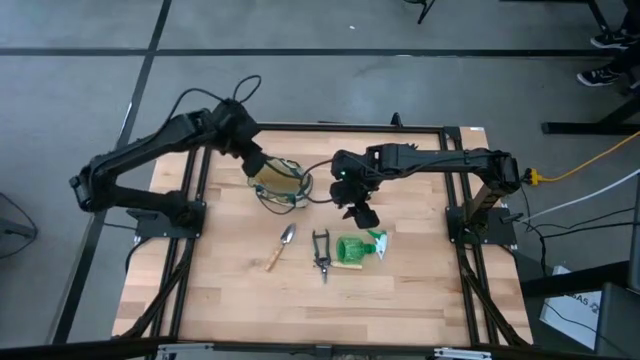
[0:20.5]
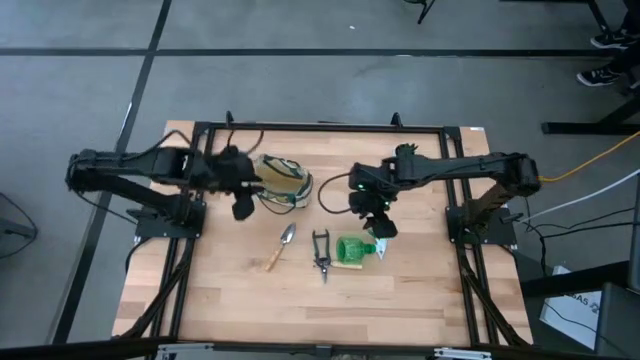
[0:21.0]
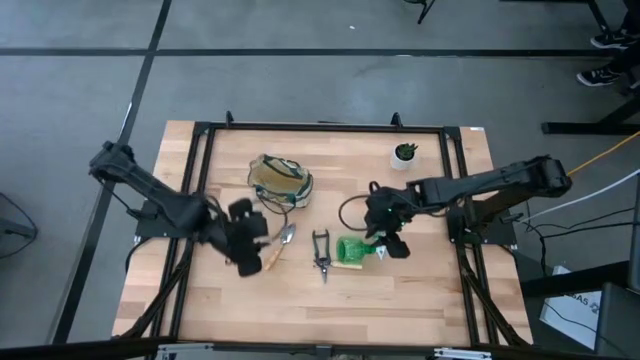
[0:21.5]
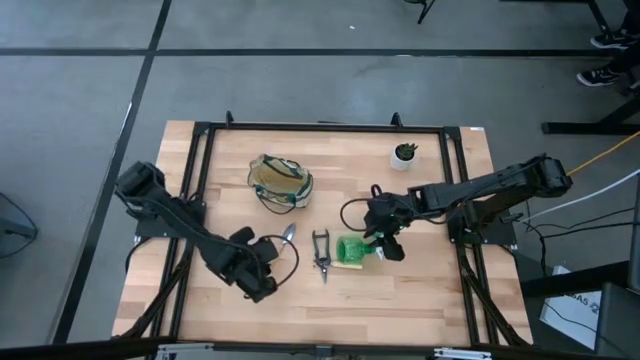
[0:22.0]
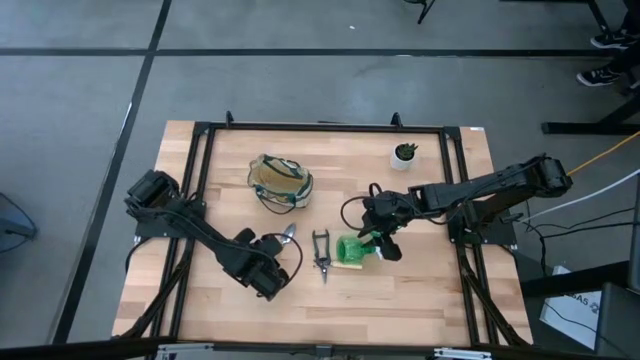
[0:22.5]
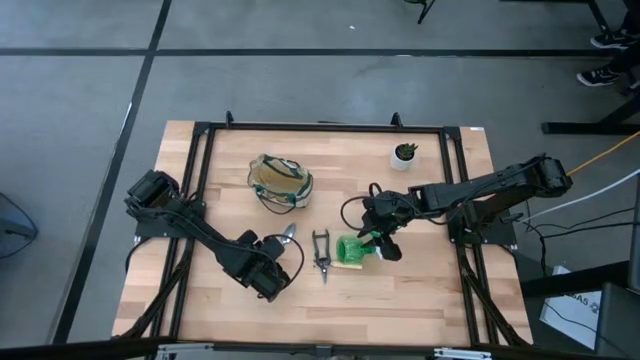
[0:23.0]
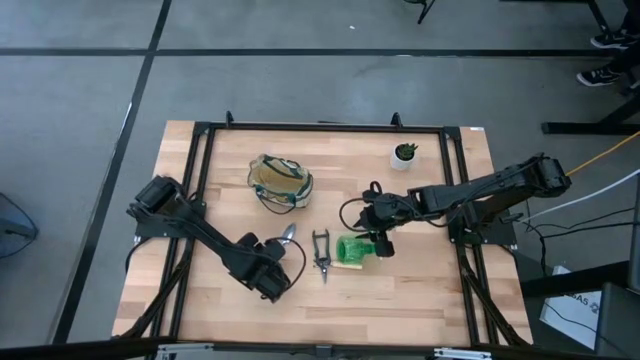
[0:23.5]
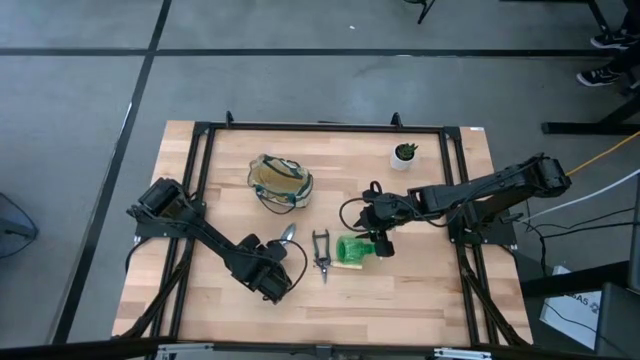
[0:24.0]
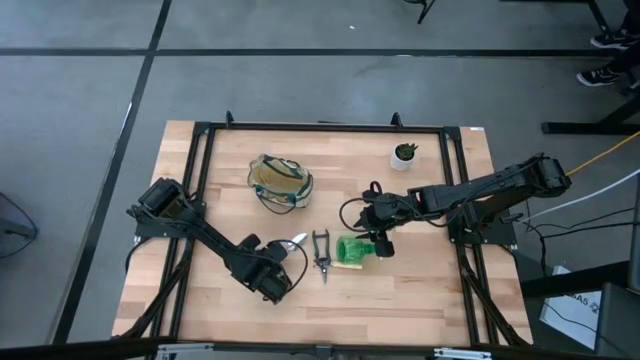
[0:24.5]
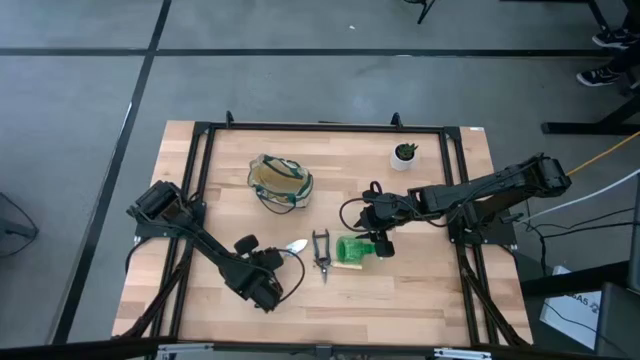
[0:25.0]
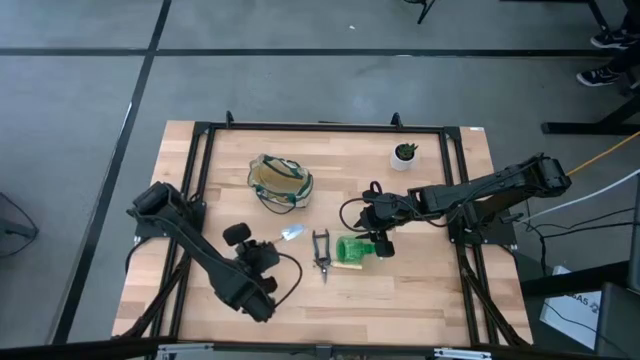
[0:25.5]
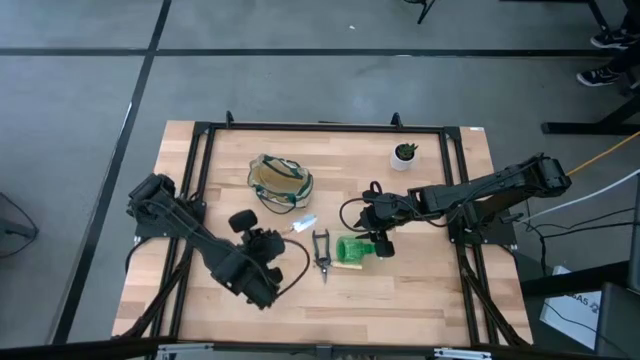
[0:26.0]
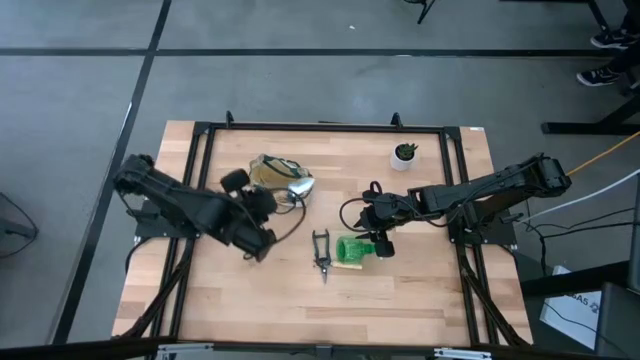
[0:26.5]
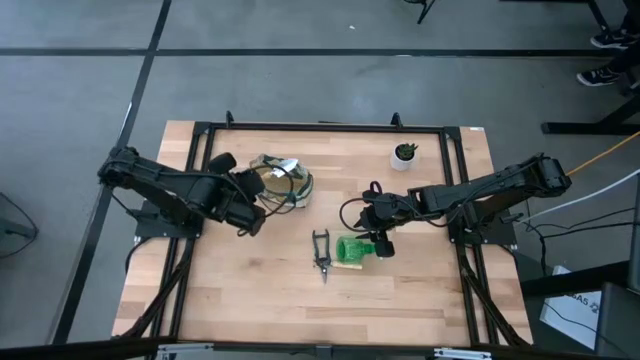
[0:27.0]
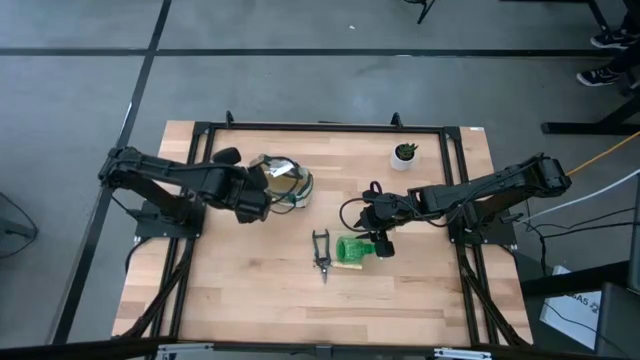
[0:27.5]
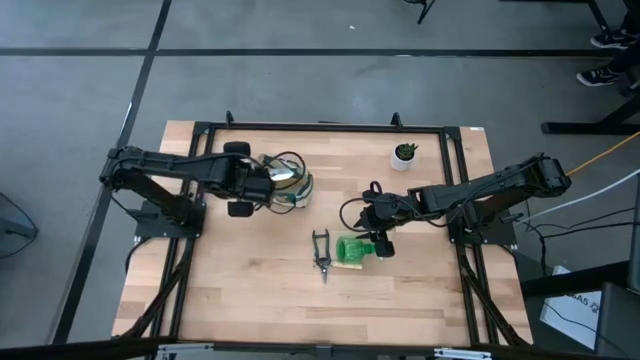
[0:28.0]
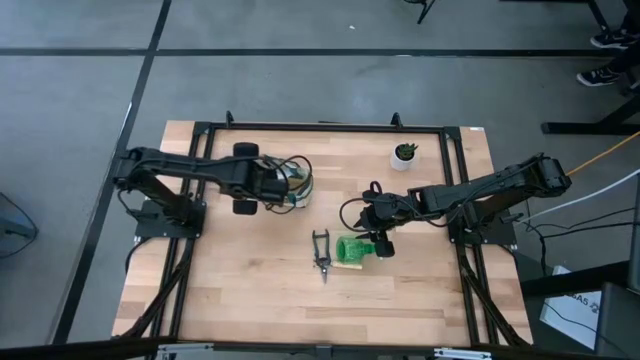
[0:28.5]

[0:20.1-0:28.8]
Task: Pick & Place Garden tools in Gardening bag
Put the trowel into the gardening bag

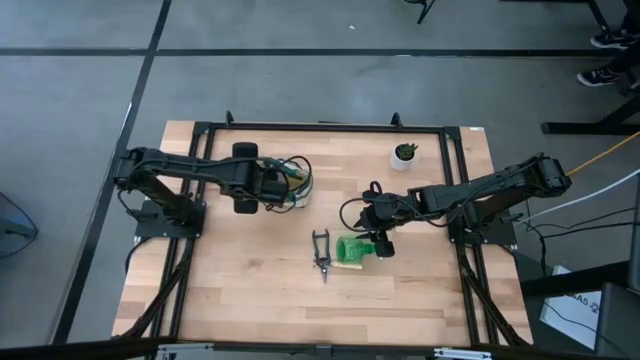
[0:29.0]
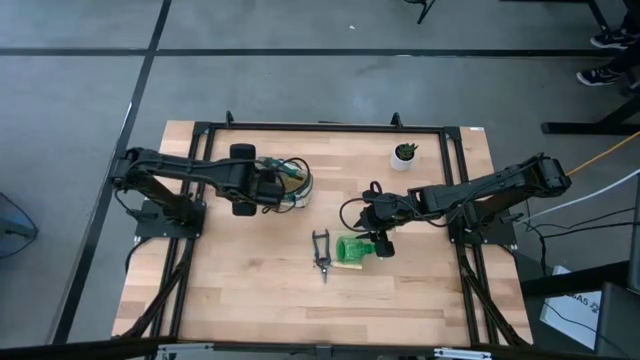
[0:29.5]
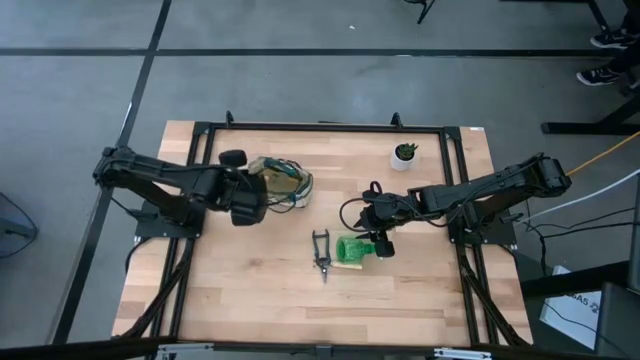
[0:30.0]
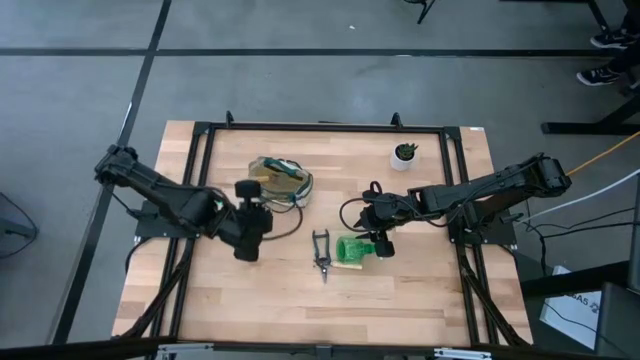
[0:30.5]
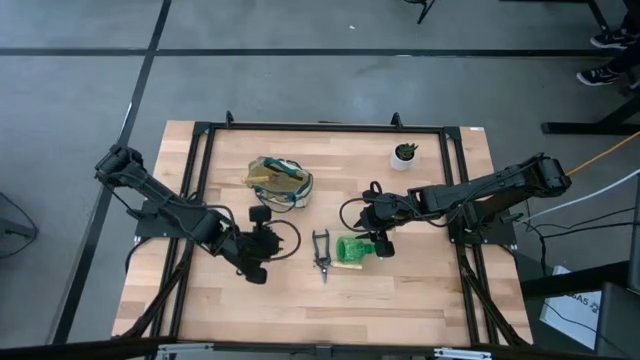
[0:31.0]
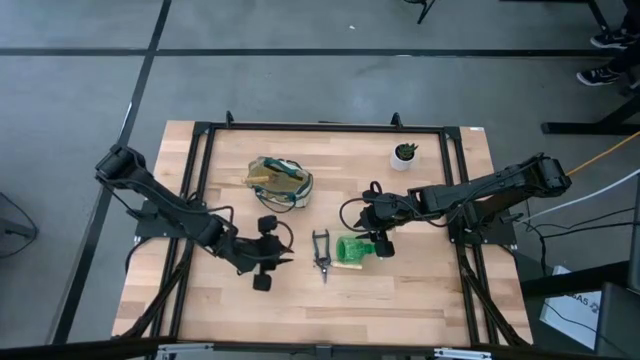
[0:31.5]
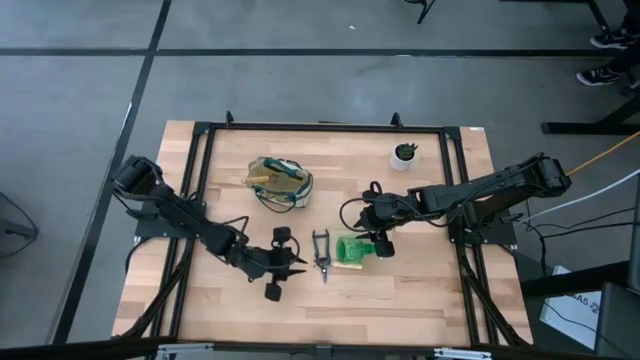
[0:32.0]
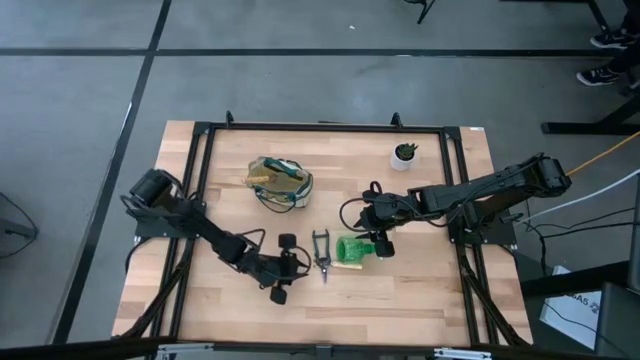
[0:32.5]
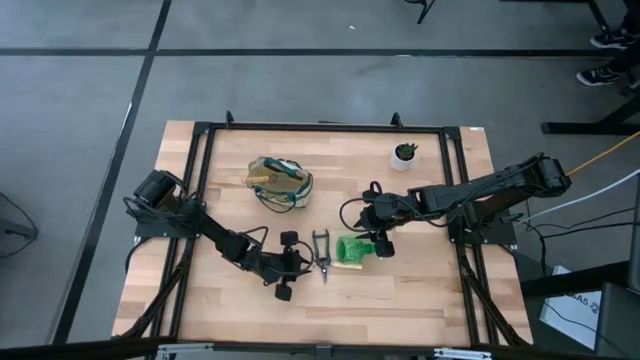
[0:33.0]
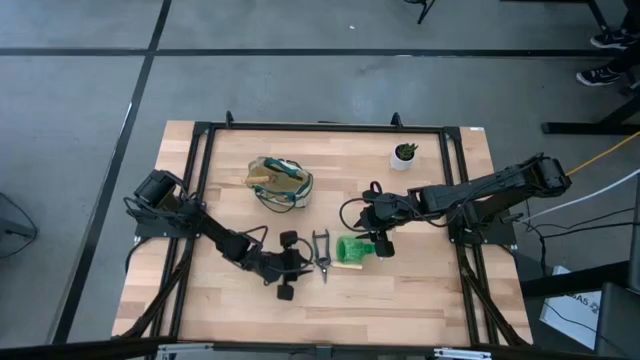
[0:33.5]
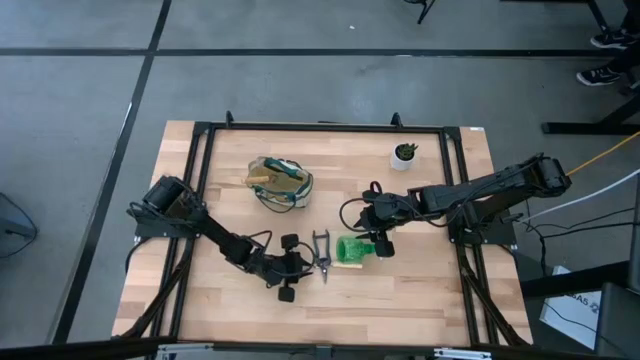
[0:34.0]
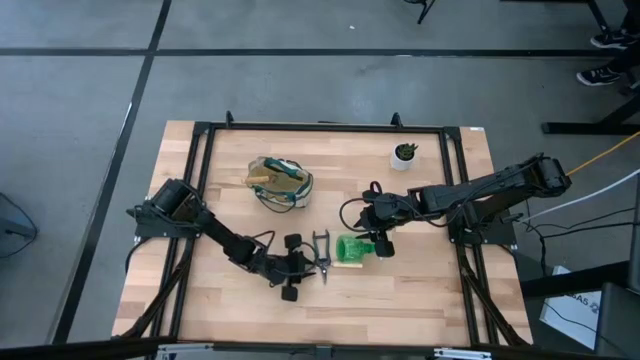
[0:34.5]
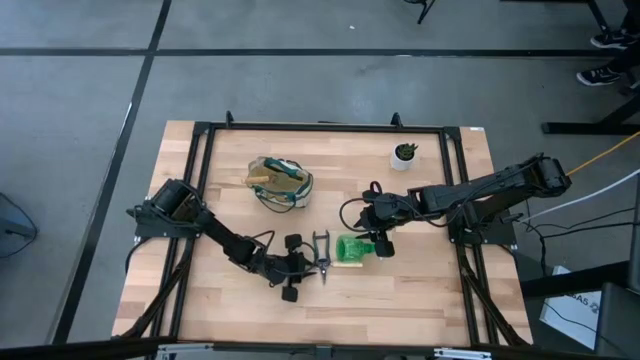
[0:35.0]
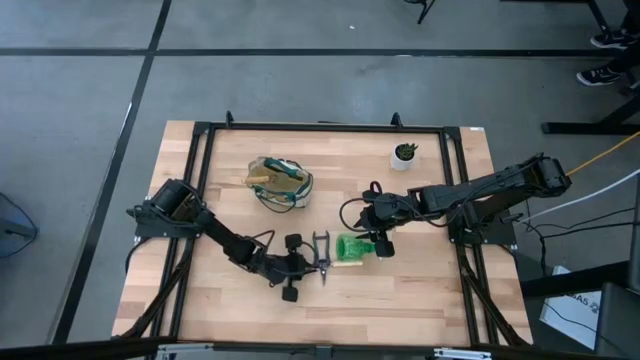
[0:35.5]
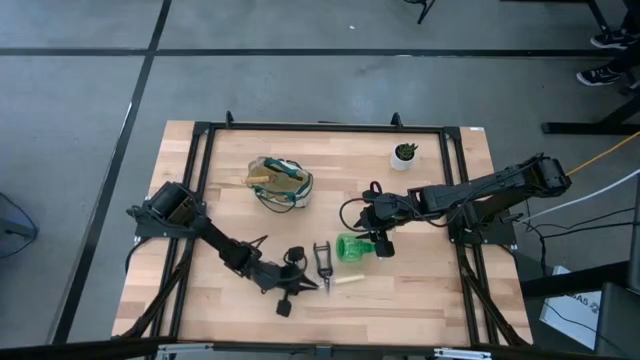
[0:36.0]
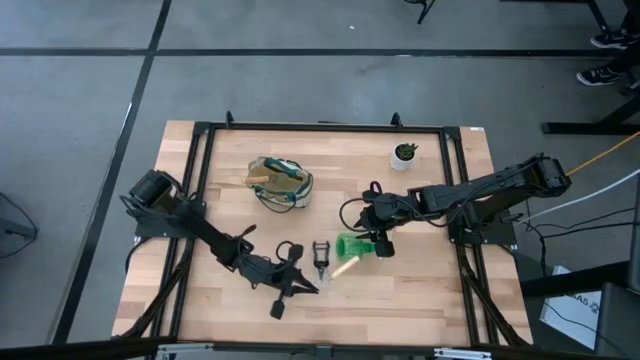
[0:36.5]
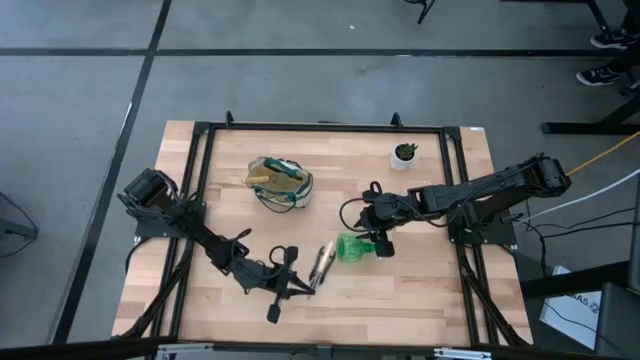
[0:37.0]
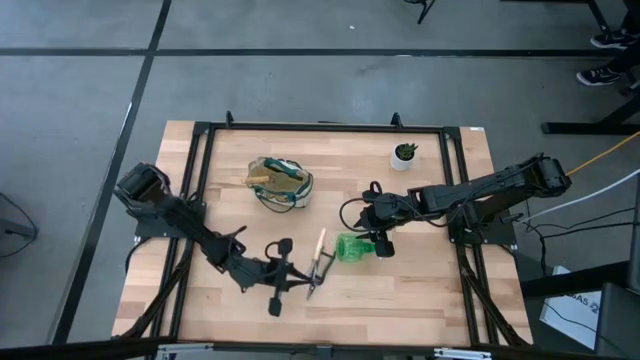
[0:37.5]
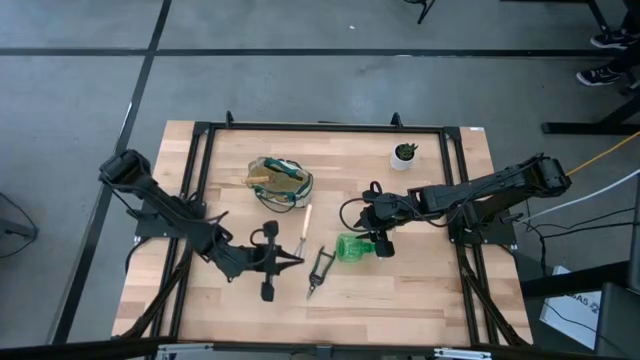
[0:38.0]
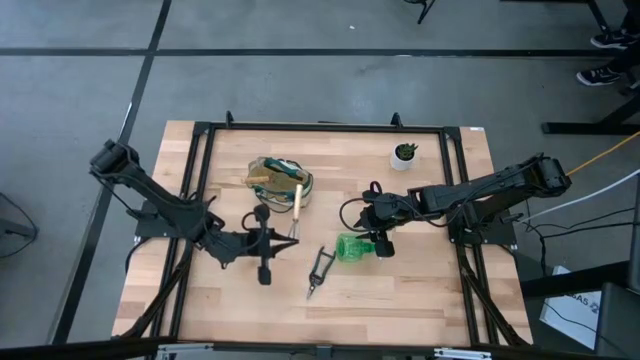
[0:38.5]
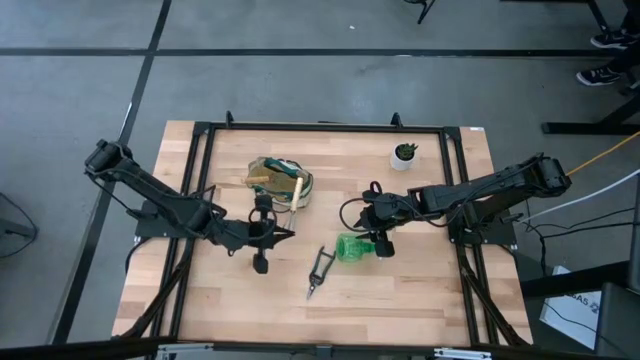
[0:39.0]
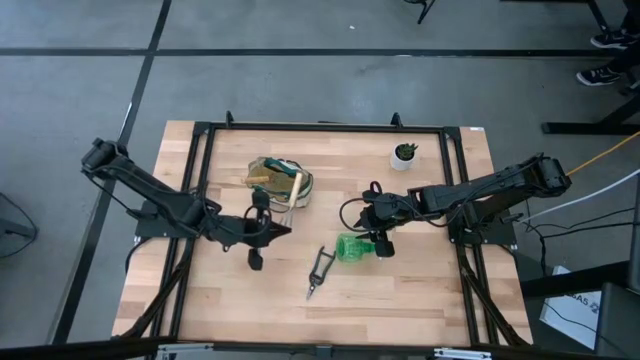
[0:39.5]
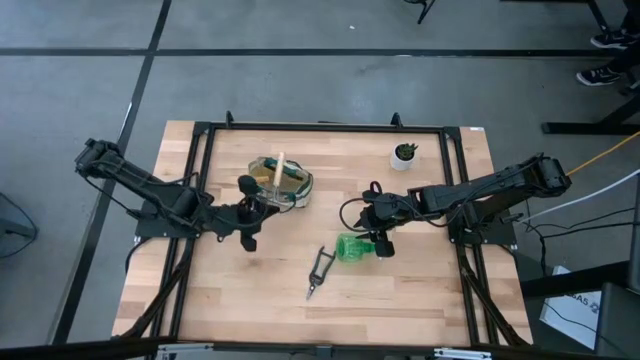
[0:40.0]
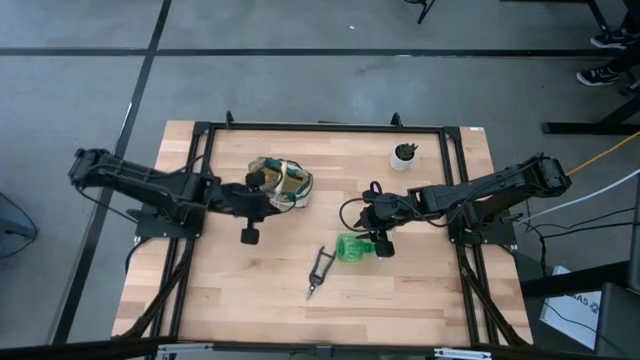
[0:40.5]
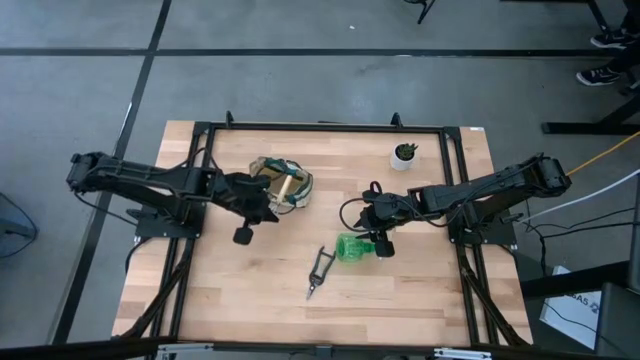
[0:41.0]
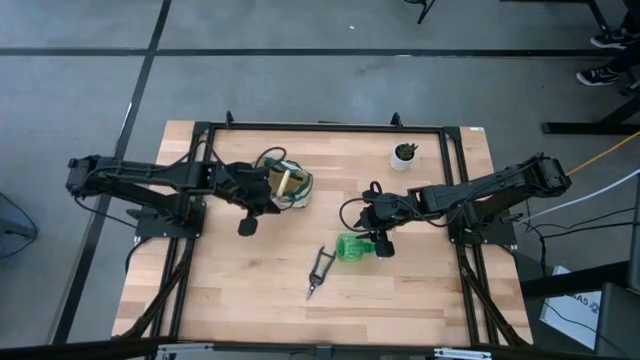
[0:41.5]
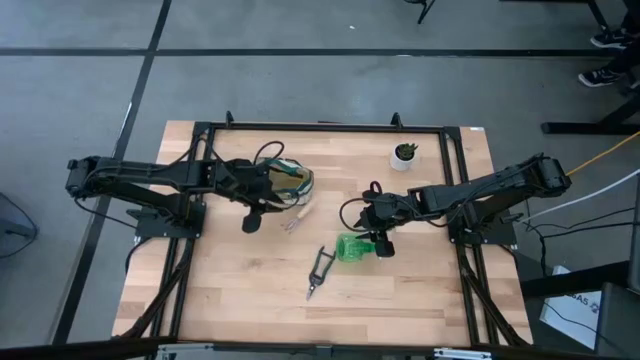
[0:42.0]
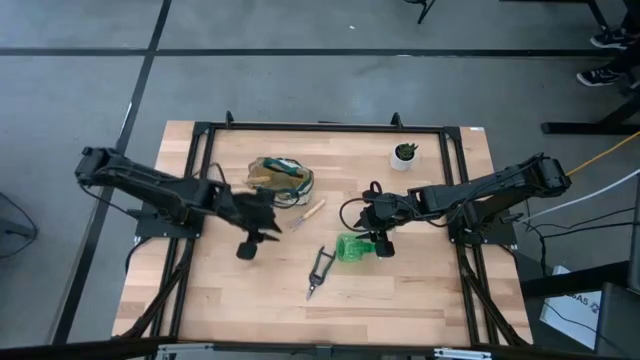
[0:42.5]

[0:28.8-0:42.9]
Put the hand rake into the gardening bag
